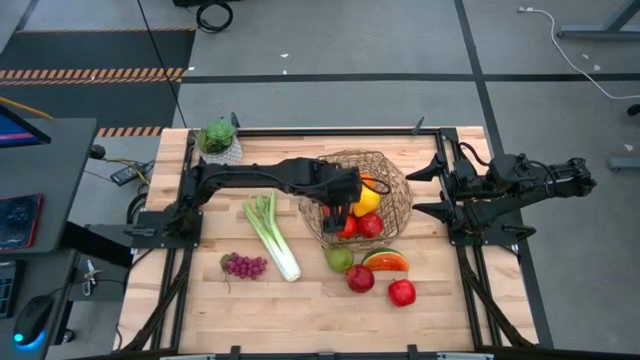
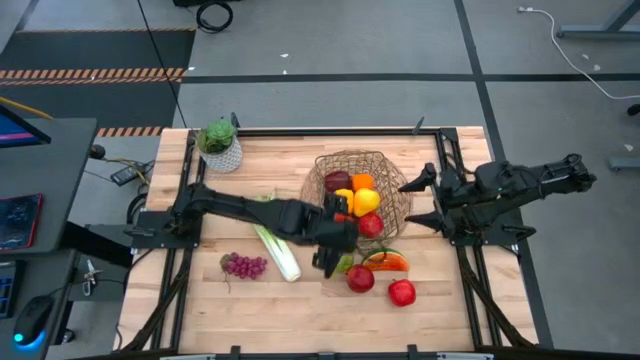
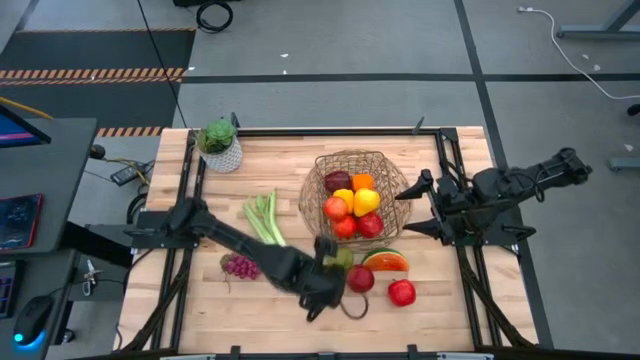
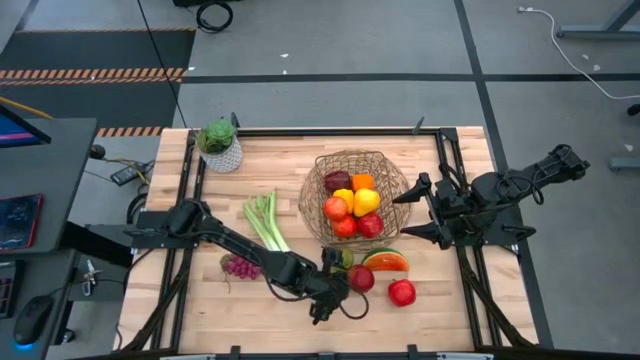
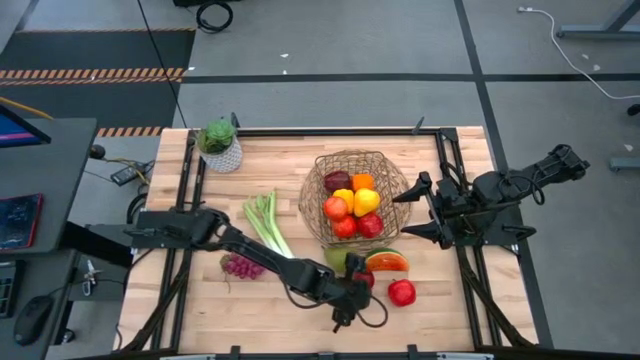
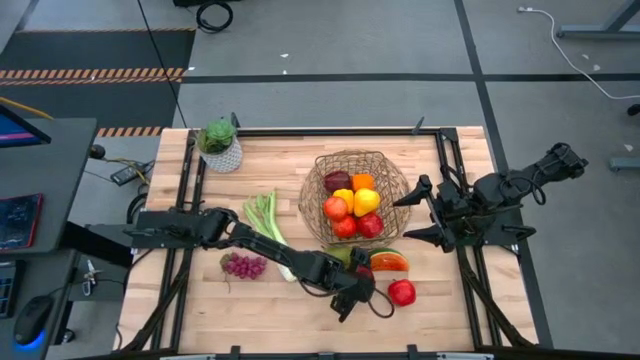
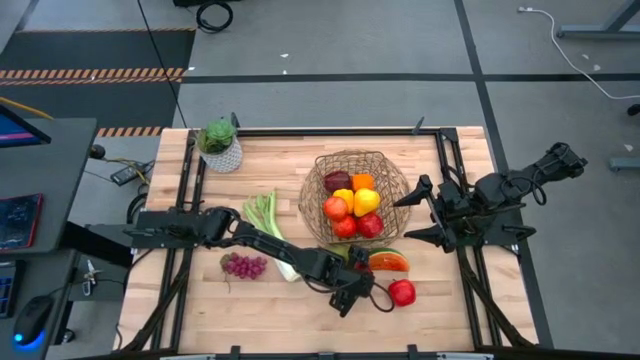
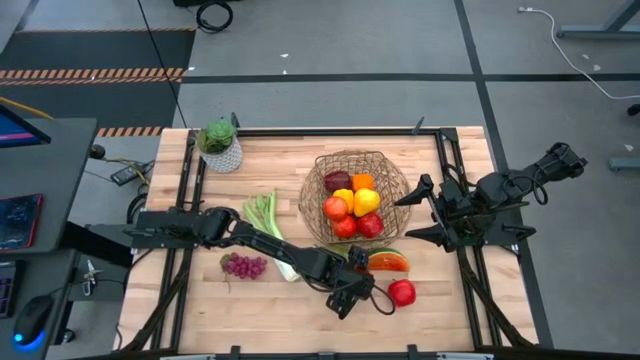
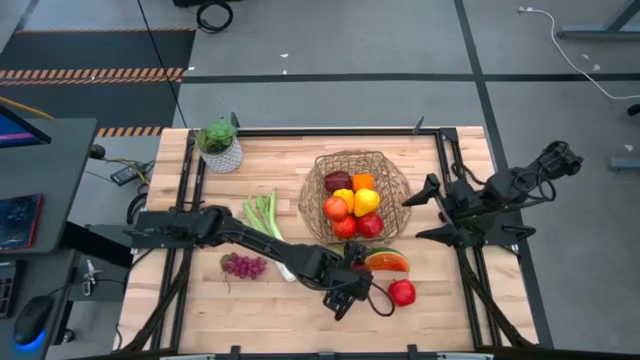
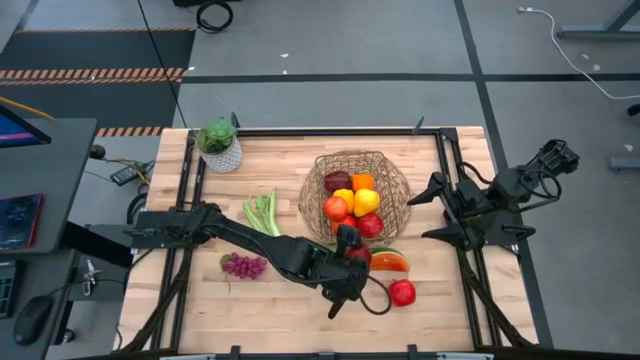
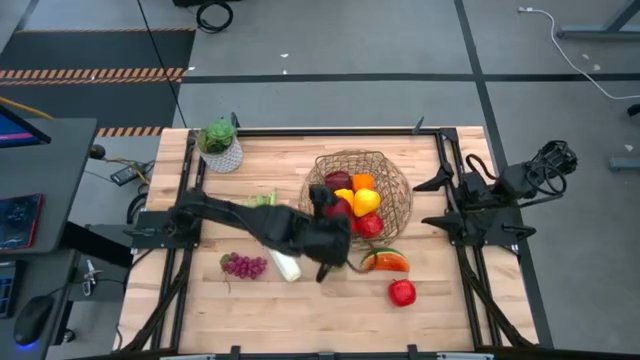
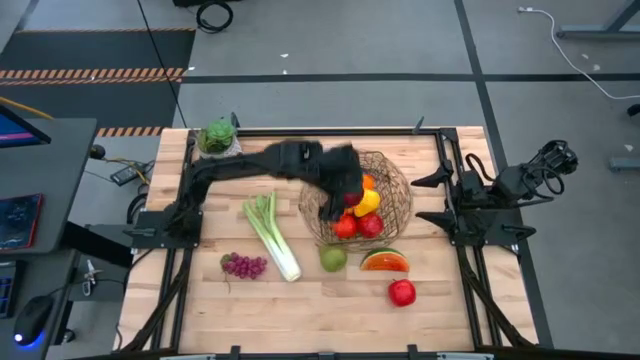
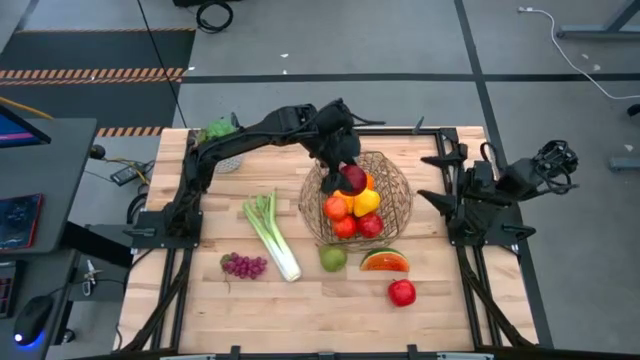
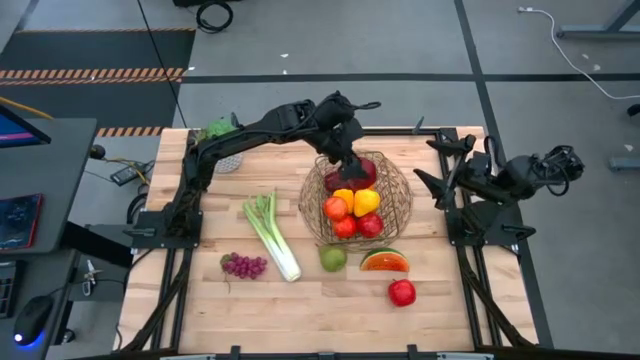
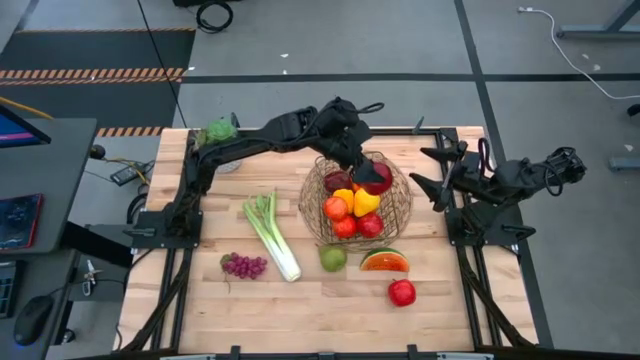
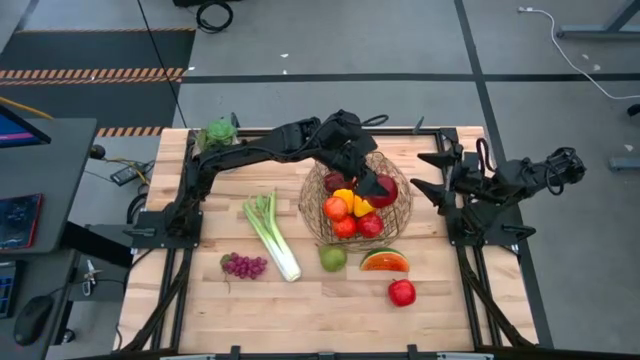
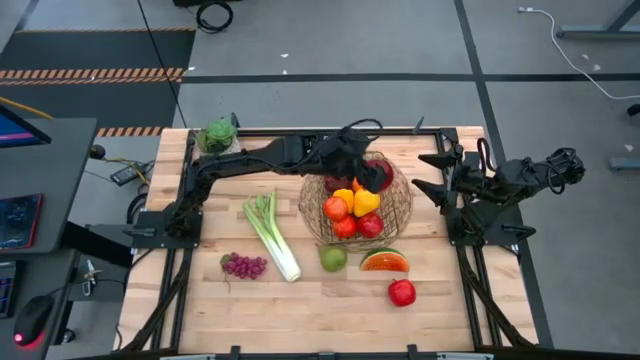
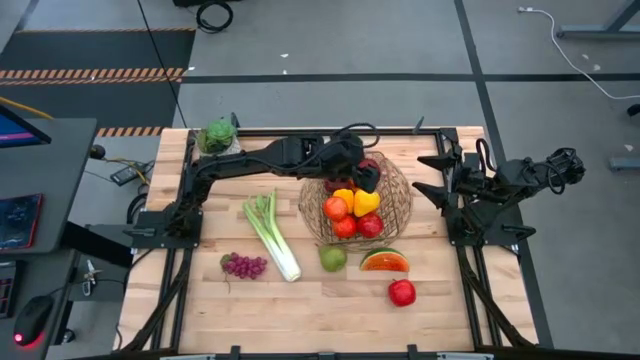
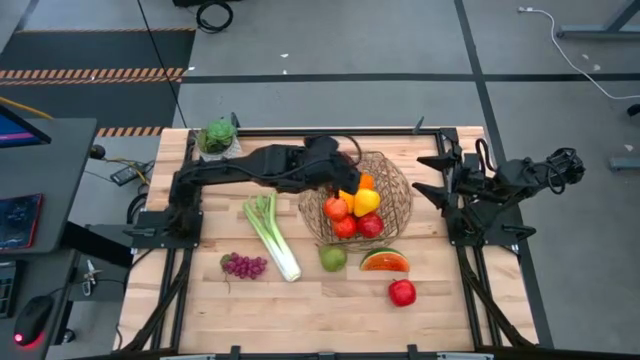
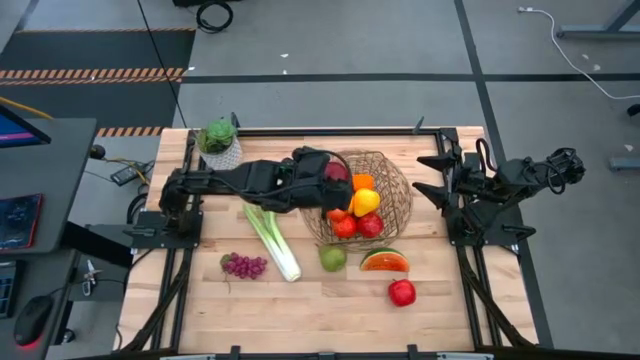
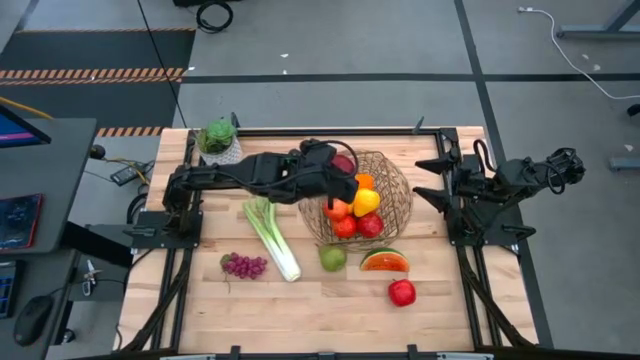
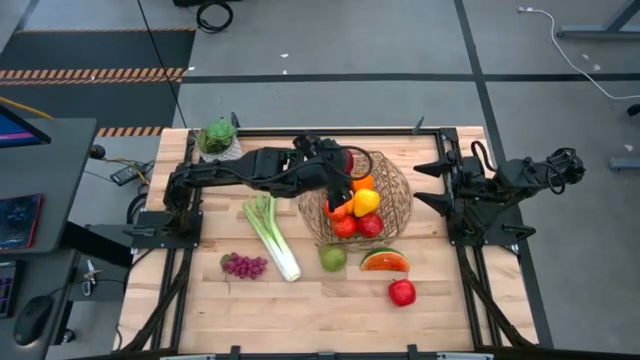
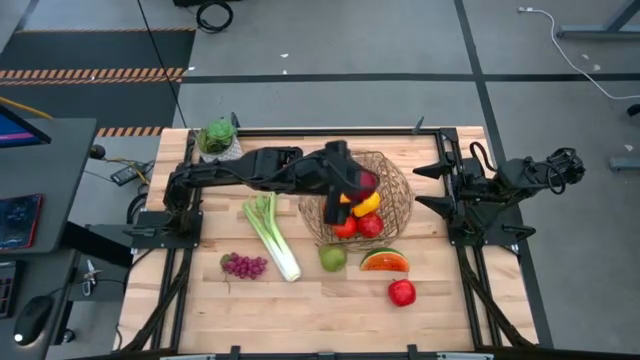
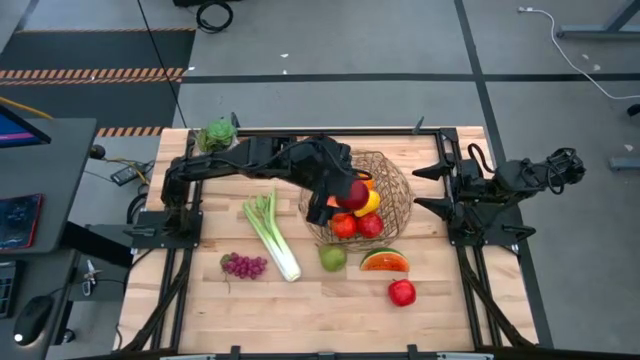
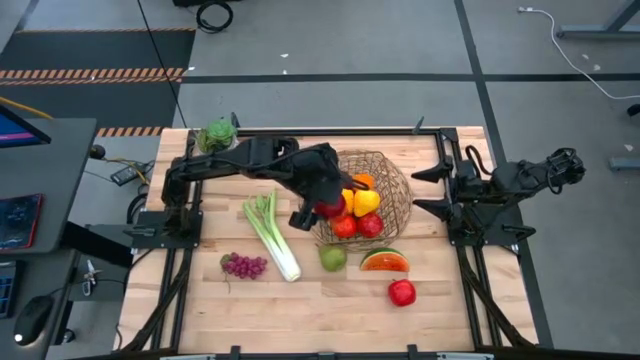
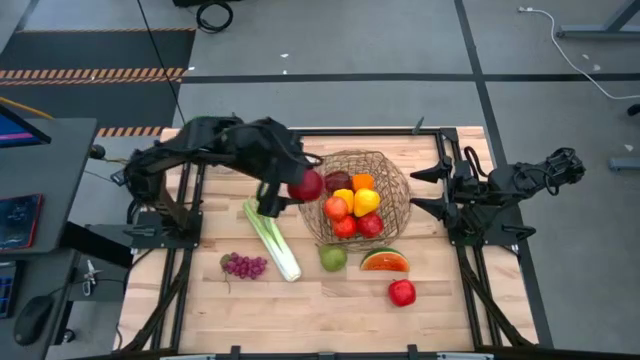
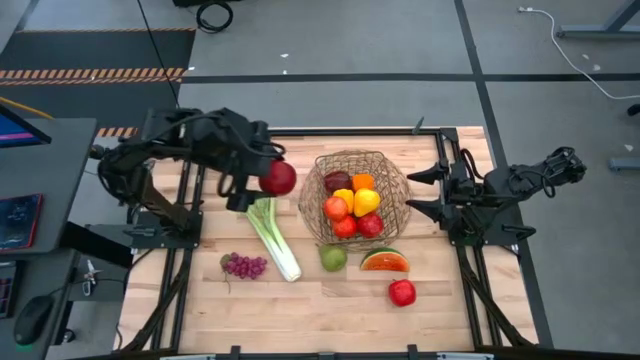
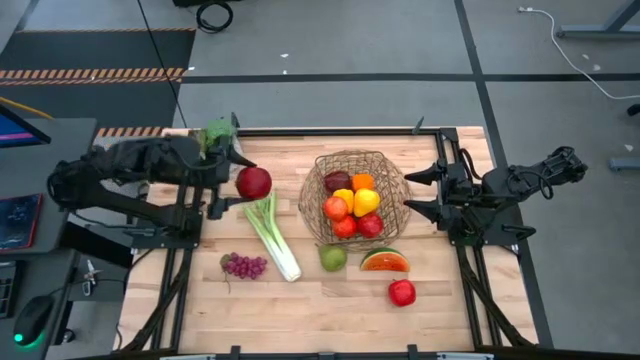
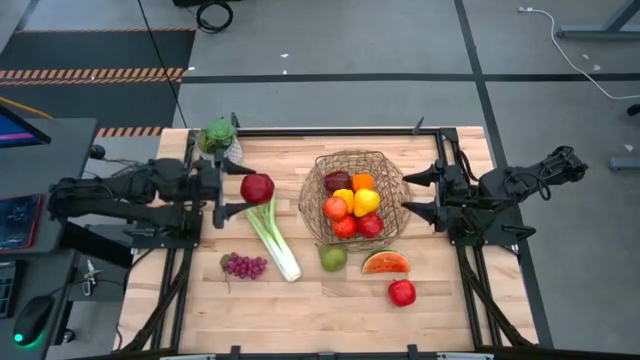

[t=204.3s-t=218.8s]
Task: Build produce basket
Put the red pomegranate into the brown wire basket

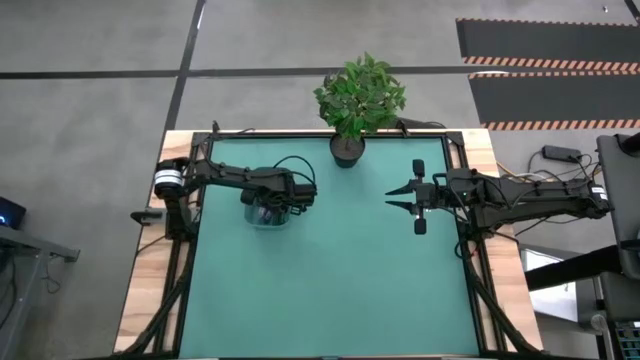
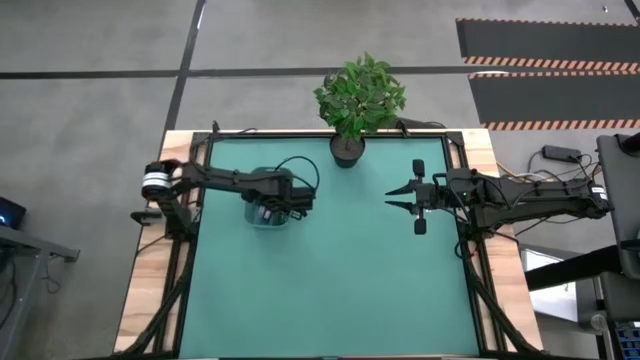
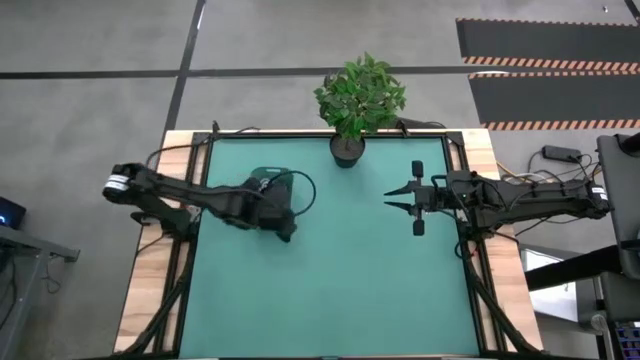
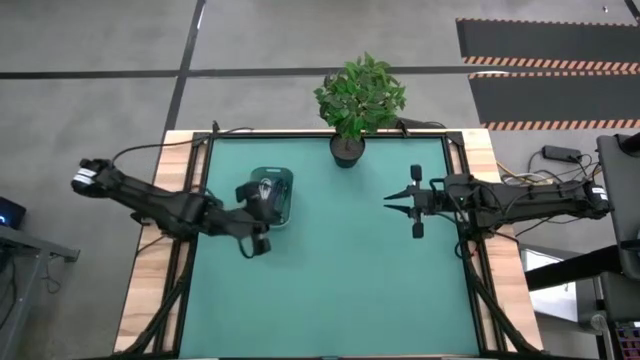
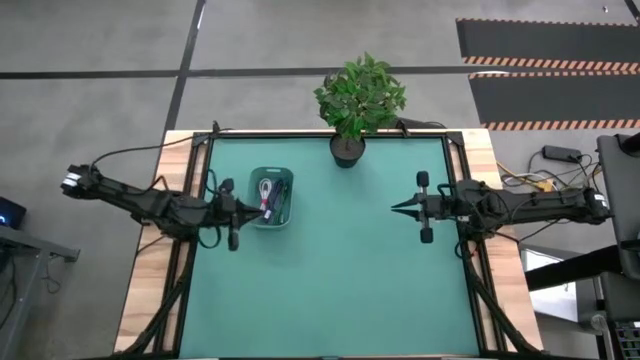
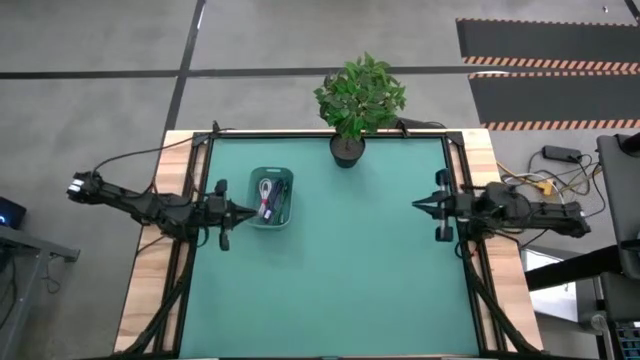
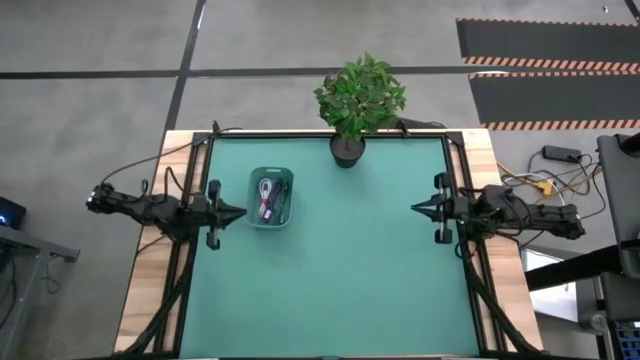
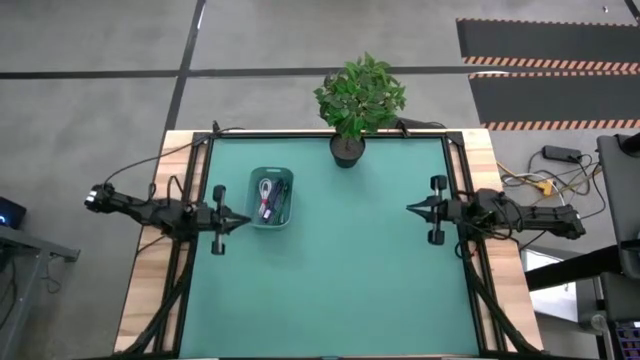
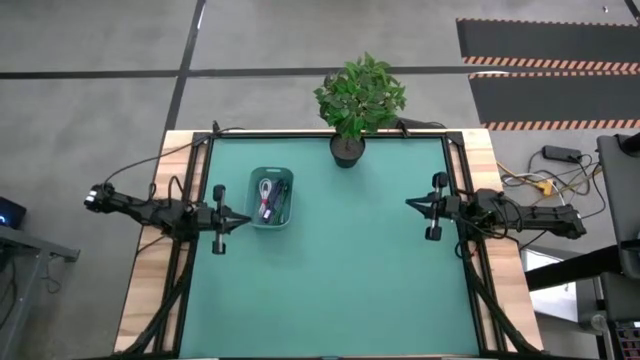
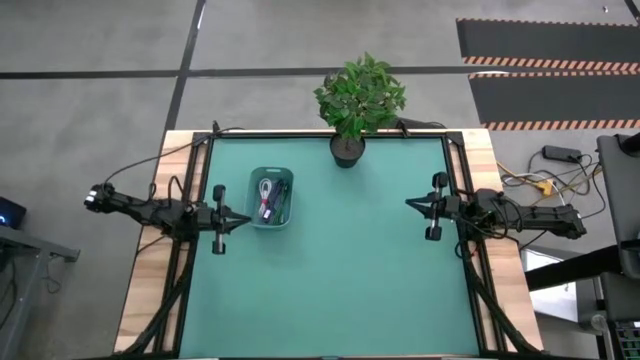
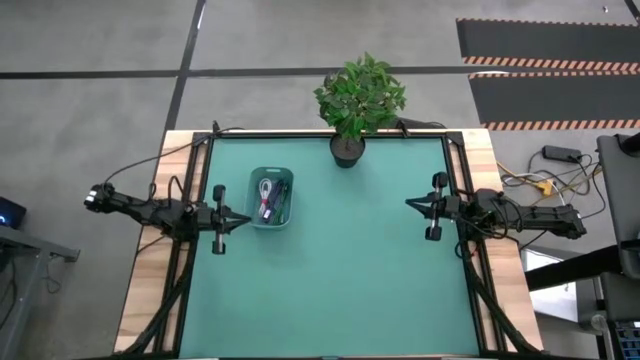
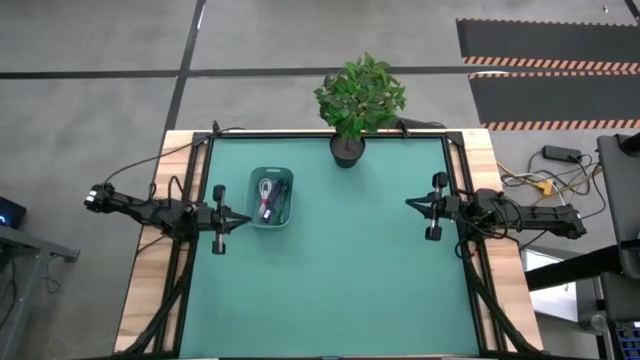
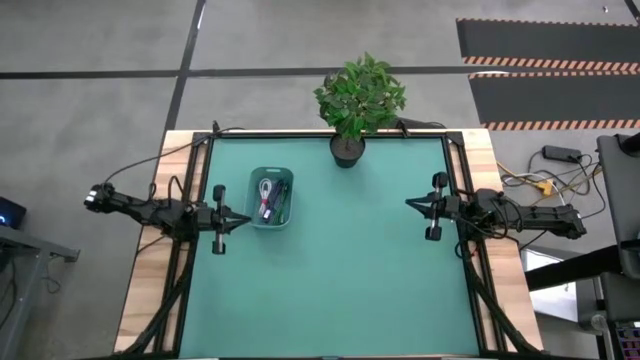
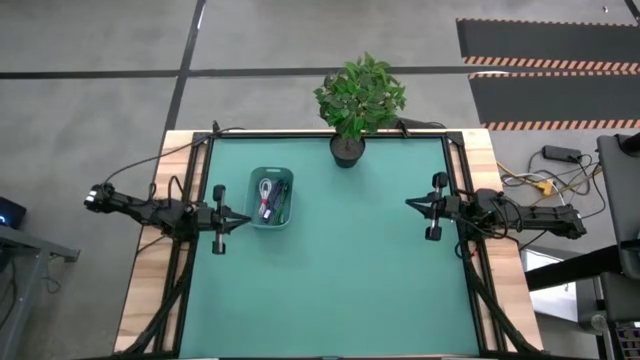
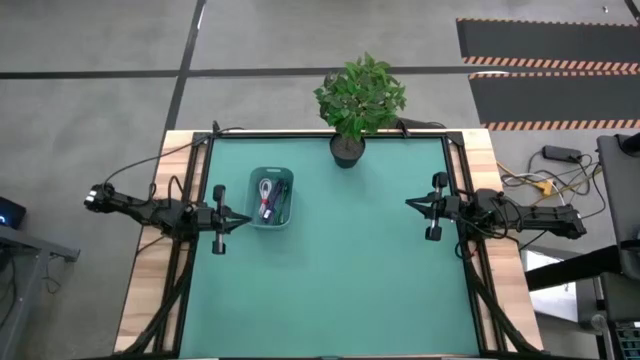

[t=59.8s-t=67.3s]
Task: Pick and place USB-C Cables
Return to Home Position
